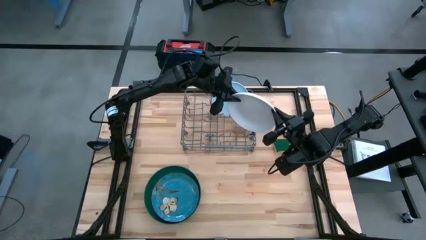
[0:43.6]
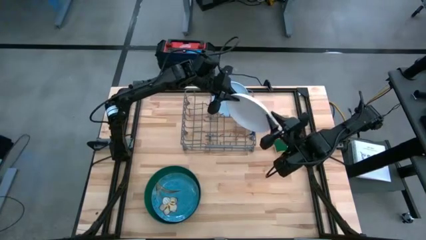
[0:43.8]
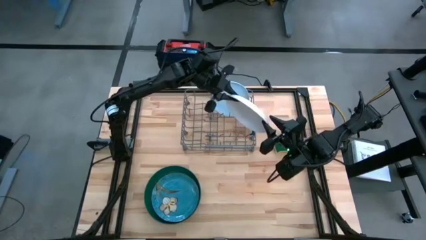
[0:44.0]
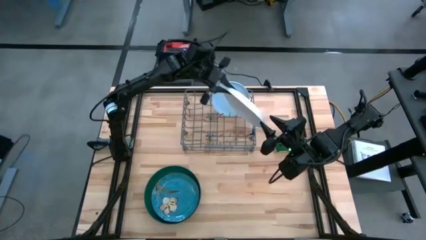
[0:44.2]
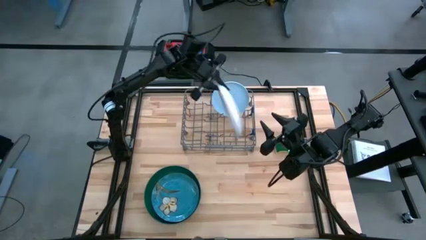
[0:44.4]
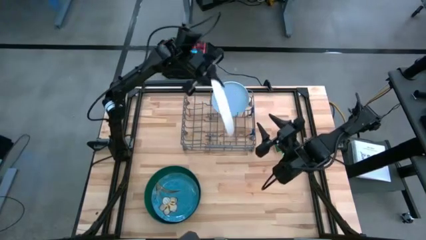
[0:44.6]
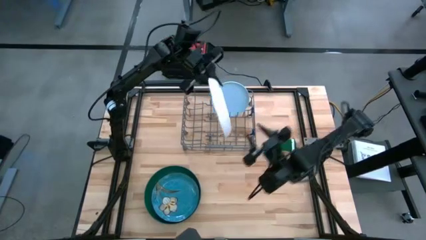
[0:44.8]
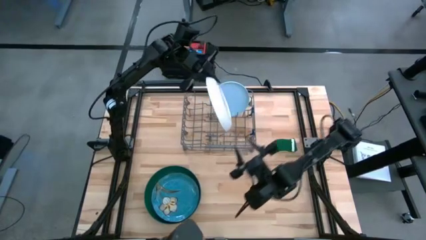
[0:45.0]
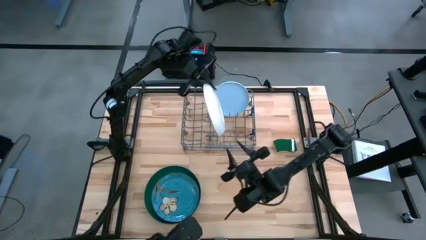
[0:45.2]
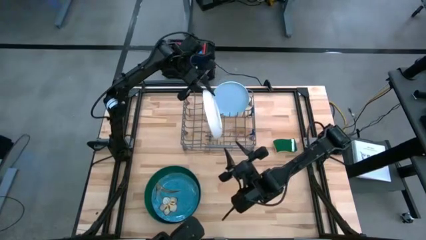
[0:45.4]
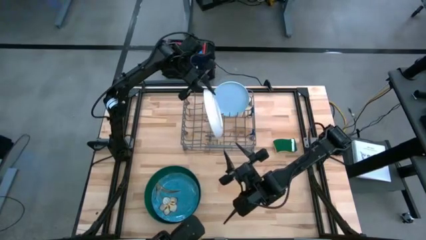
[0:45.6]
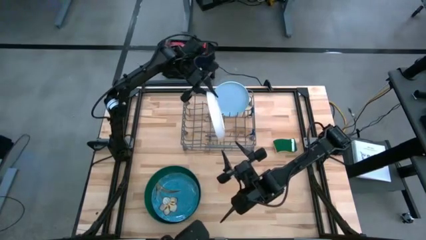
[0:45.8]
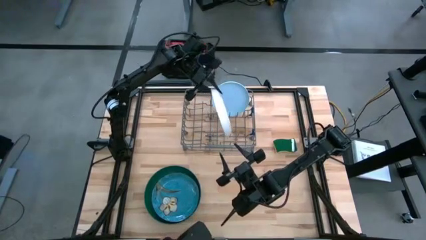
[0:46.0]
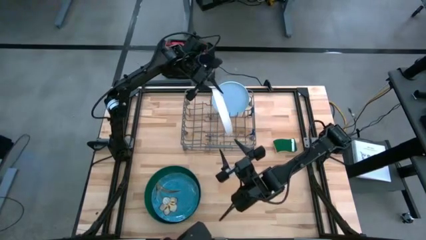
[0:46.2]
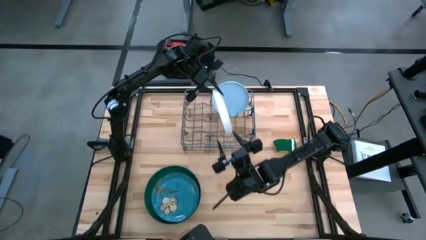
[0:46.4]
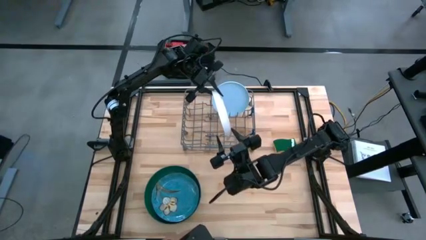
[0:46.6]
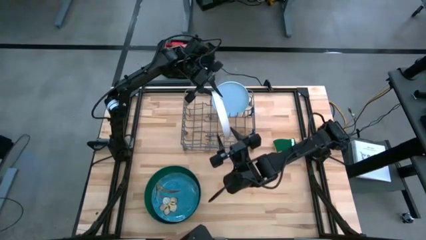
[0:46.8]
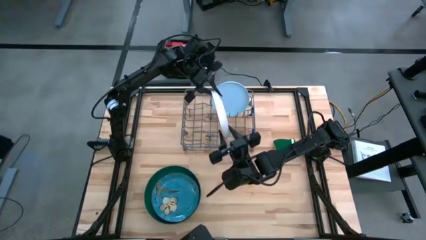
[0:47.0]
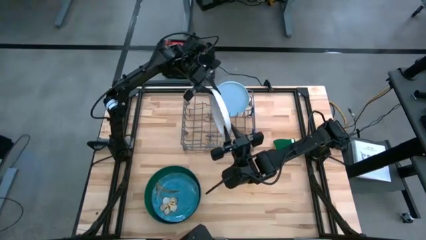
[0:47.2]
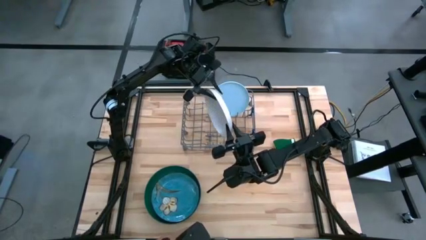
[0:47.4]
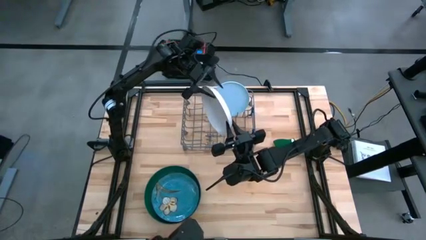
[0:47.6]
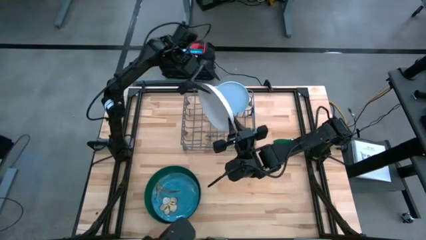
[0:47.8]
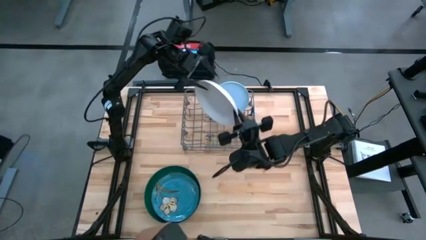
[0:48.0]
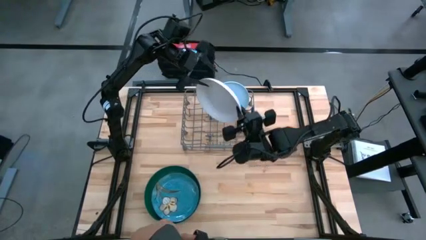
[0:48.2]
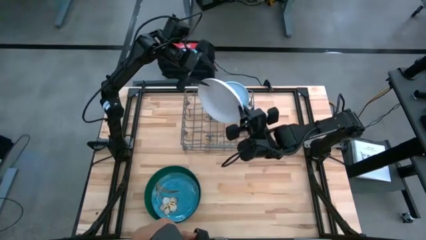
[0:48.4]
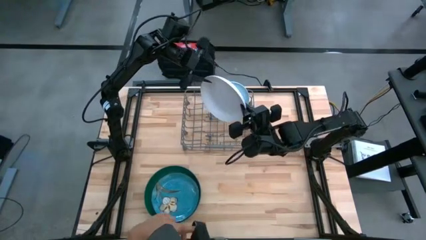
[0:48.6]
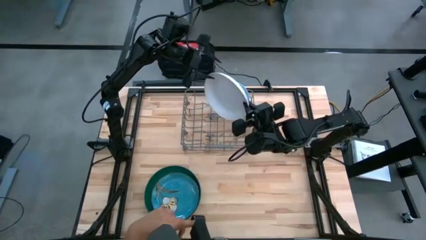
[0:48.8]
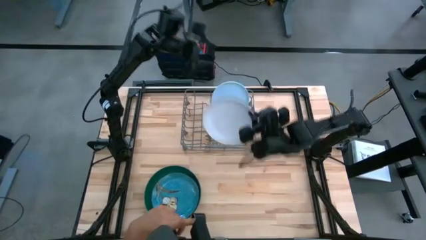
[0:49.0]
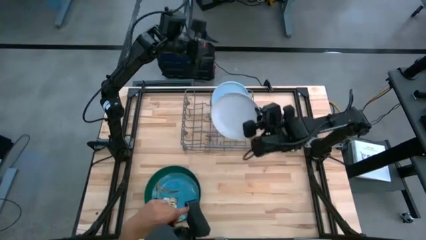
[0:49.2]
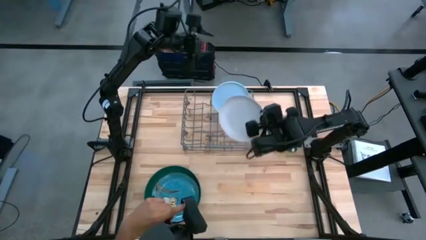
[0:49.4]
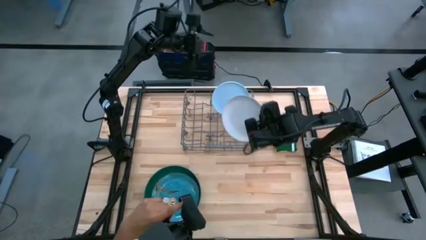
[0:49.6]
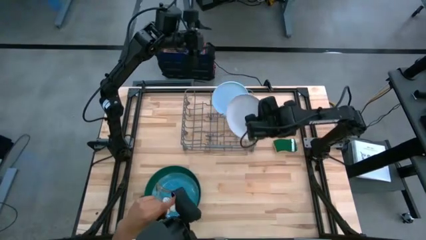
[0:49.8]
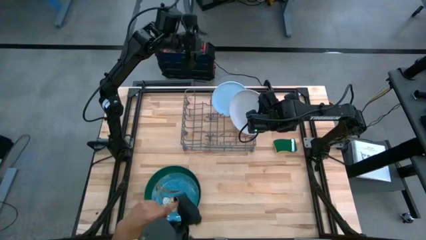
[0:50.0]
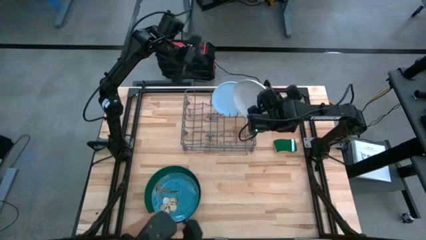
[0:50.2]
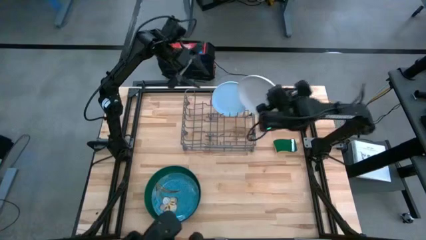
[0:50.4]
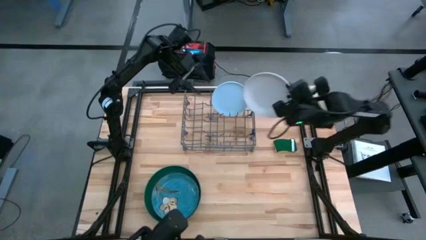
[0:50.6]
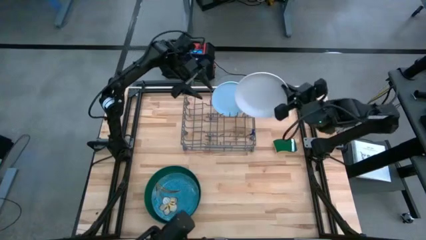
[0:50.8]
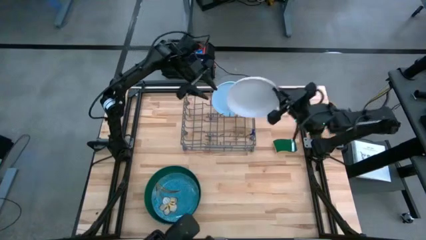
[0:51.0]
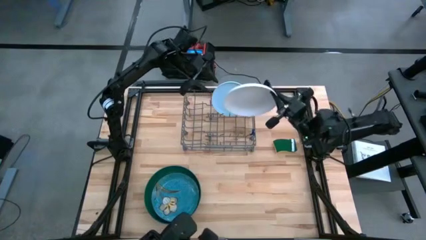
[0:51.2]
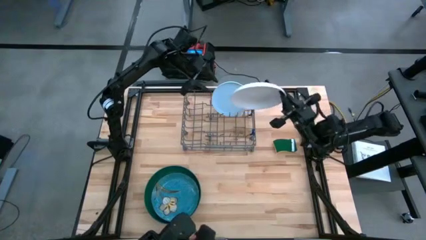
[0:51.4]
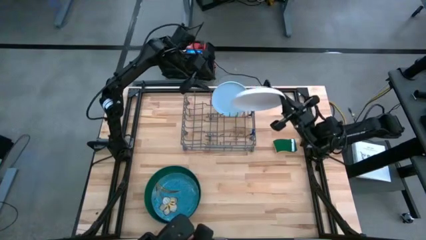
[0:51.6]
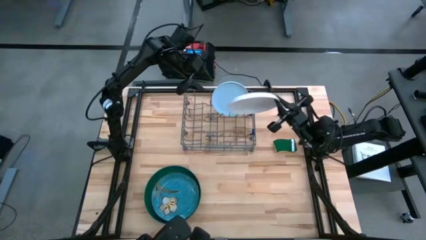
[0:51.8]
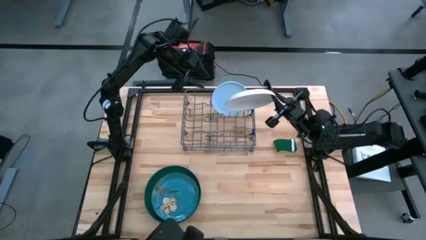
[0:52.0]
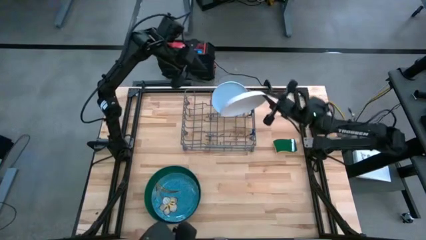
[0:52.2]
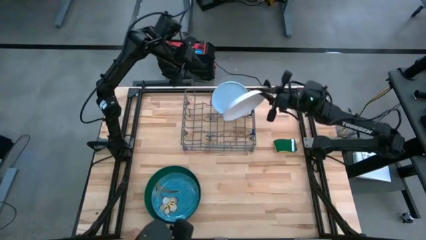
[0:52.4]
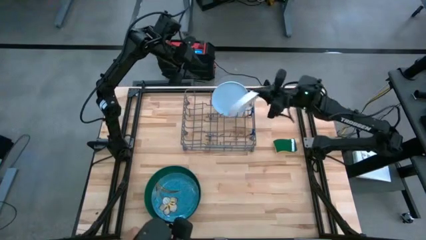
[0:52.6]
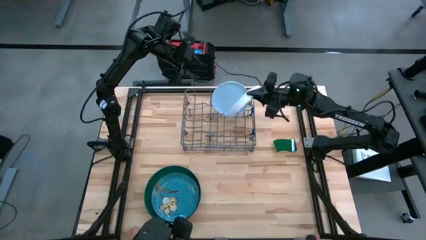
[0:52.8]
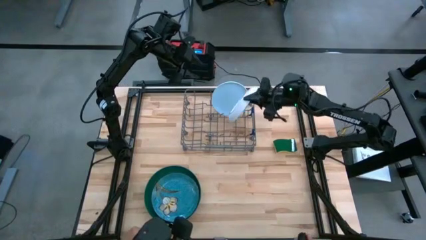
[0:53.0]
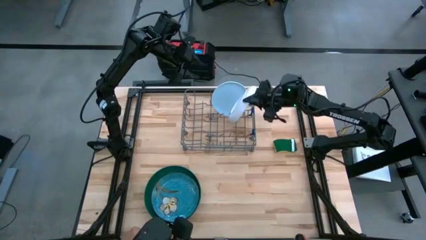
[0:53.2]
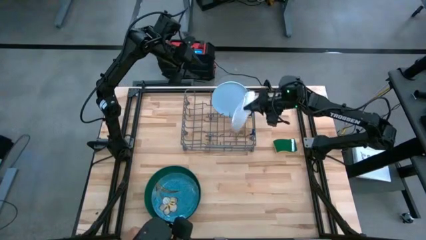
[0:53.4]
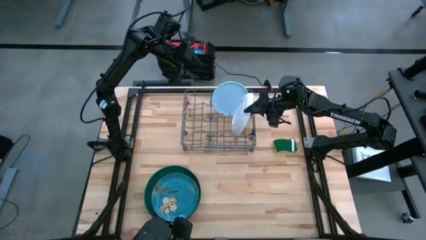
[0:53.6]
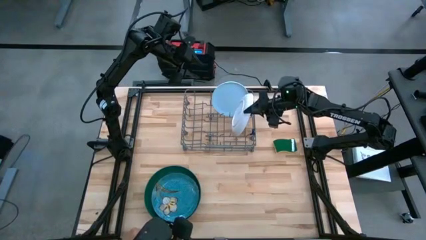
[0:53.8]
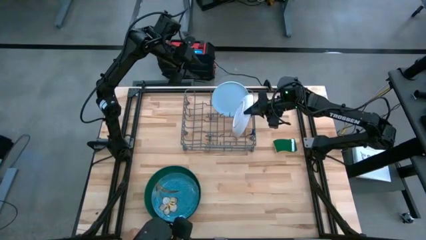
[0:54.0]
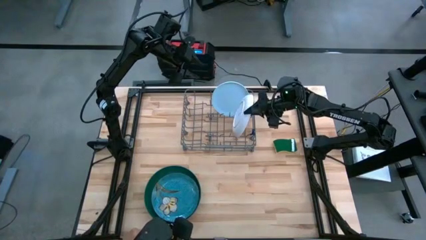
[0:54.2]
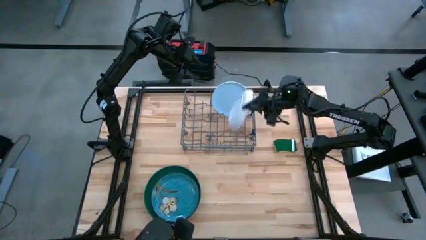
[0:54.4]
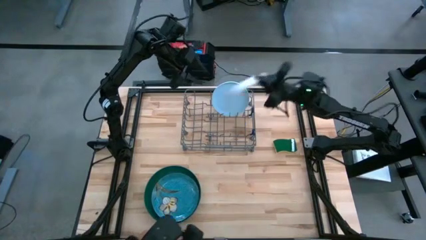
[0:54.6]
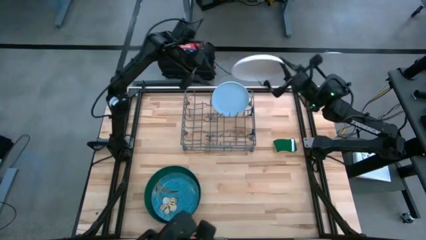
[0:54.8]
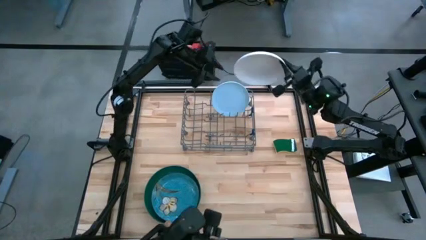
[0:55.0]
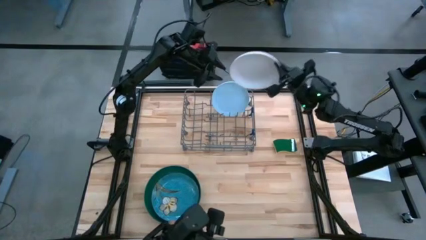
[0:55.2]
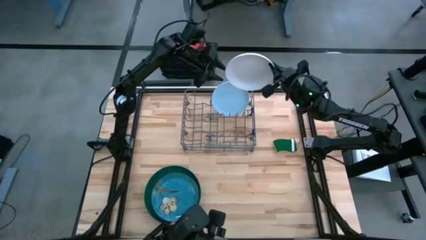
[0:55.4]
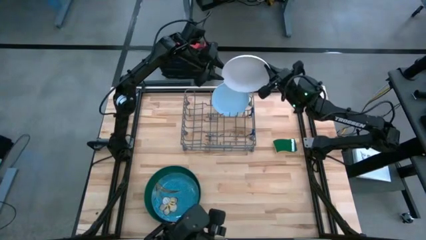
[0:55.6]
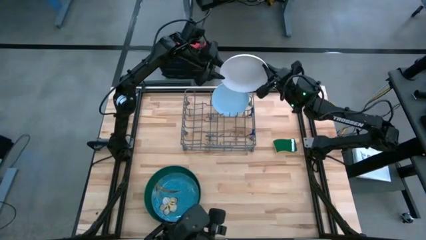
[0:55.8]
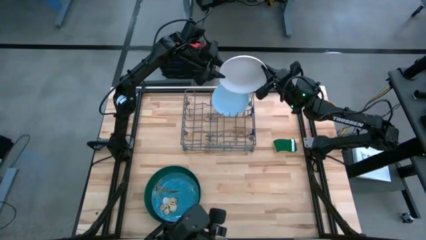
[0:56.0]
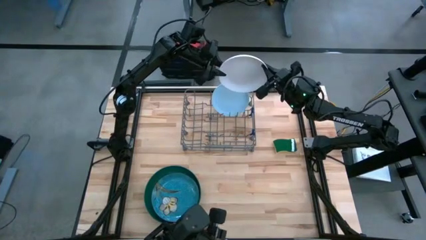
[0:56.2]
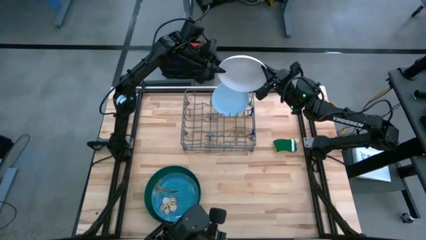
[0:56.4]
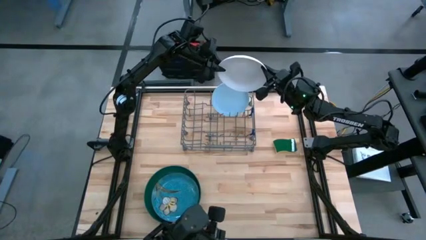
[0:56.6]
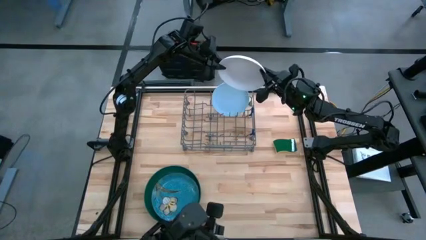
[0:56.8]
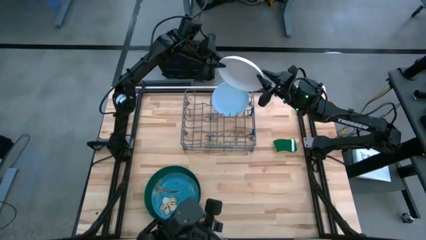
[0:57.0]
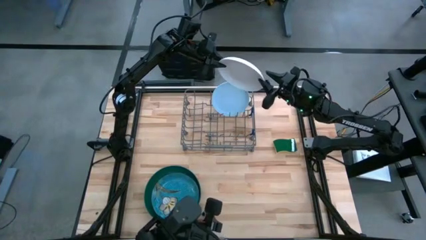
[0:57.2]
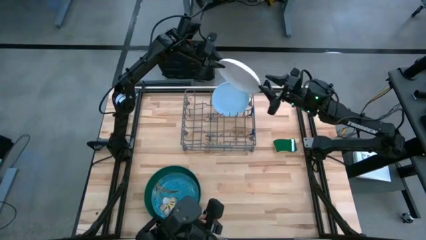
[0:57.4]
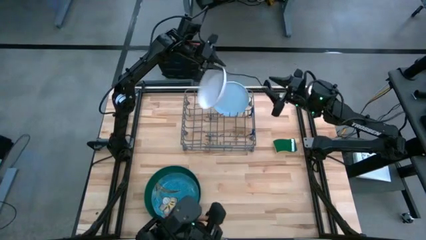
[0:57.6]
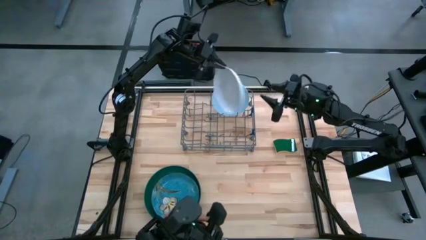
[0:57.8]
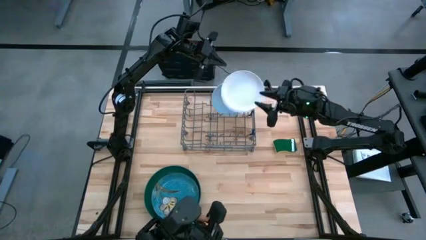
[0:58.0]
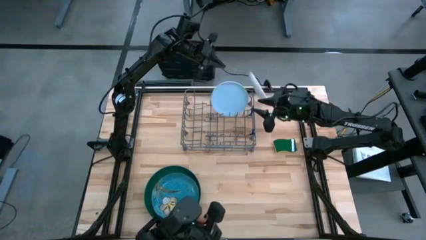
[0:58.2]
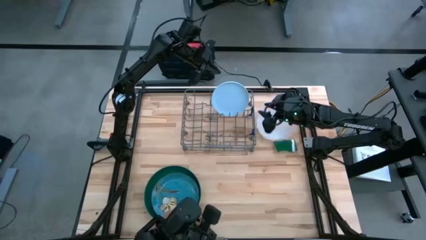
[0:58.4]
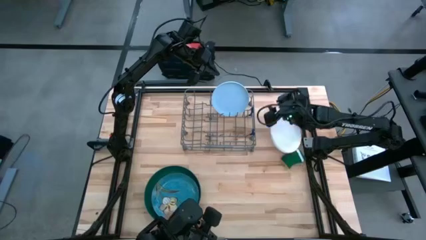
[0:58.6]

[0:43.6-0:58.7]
Task: Sort dishes
Put the white plate in the dishwasher rack
